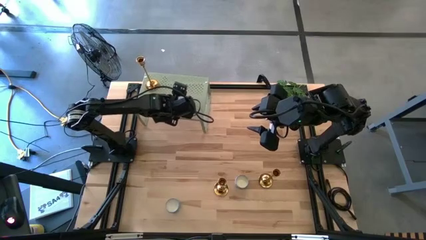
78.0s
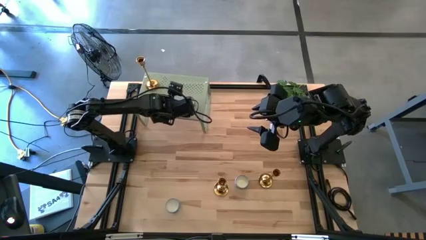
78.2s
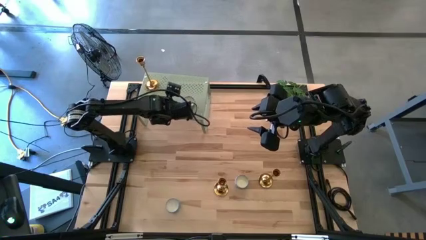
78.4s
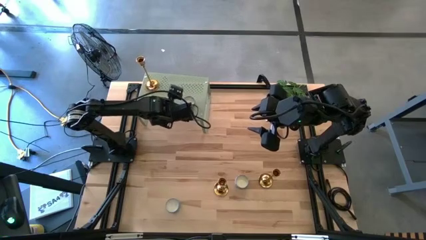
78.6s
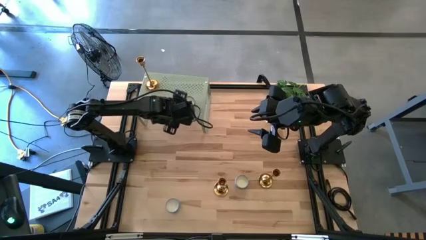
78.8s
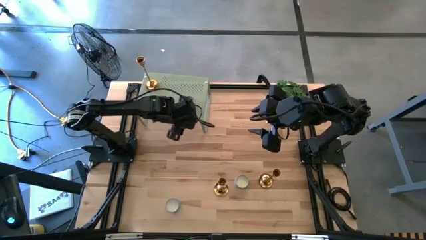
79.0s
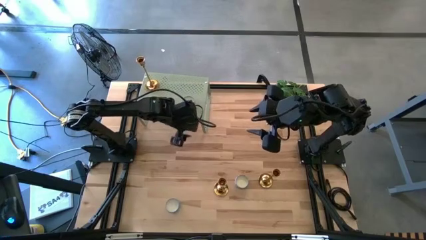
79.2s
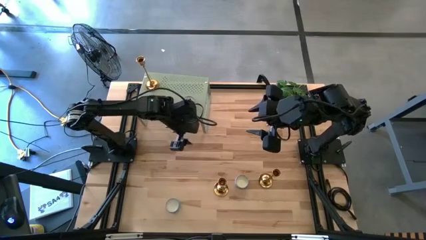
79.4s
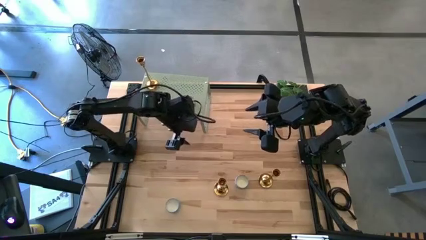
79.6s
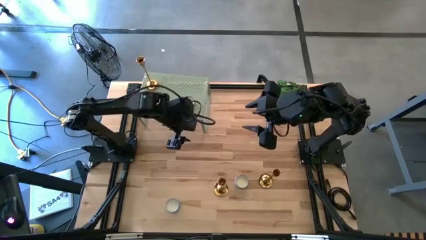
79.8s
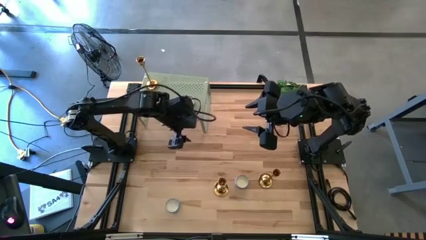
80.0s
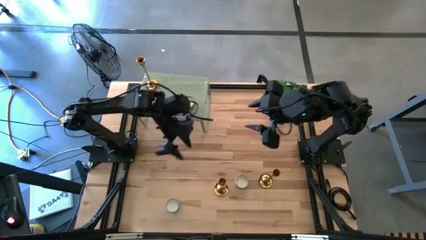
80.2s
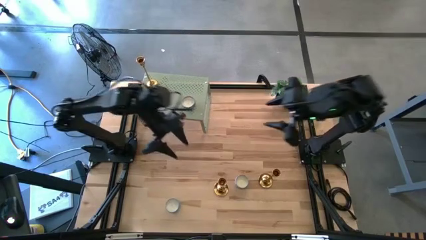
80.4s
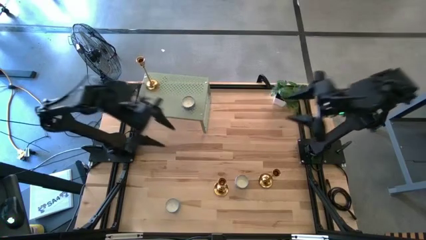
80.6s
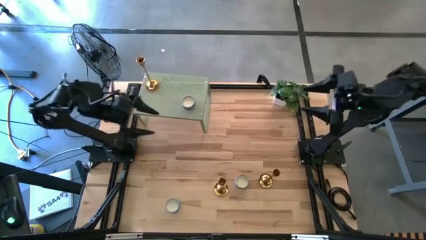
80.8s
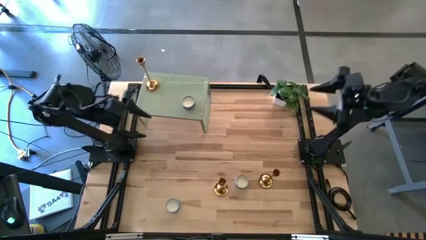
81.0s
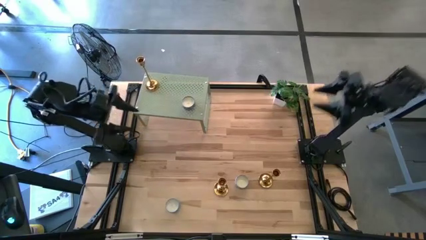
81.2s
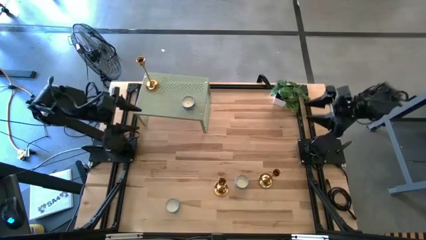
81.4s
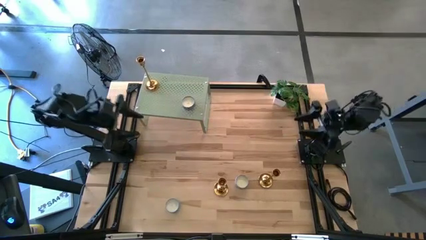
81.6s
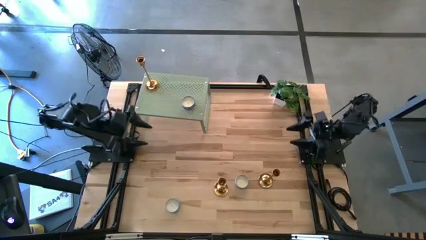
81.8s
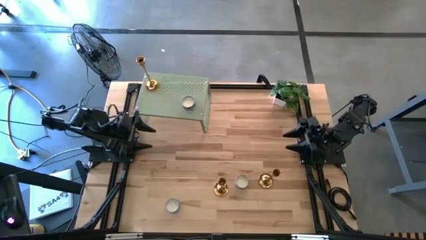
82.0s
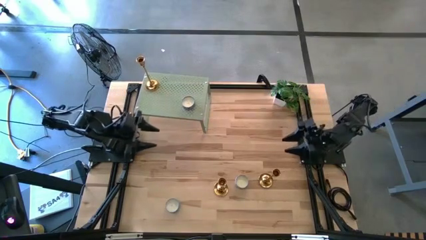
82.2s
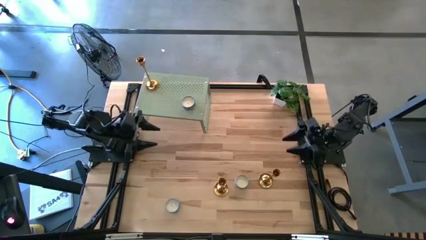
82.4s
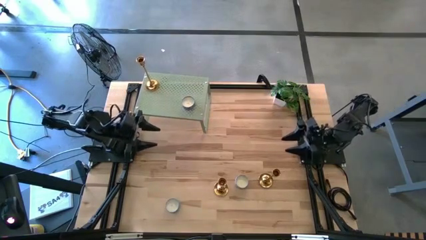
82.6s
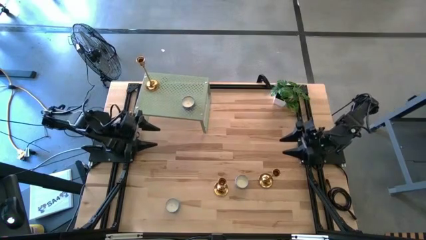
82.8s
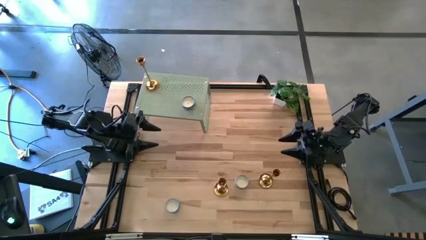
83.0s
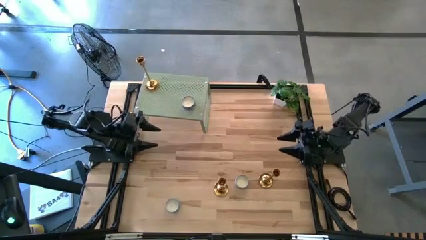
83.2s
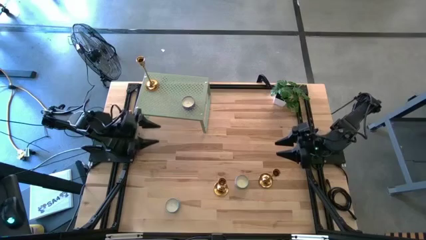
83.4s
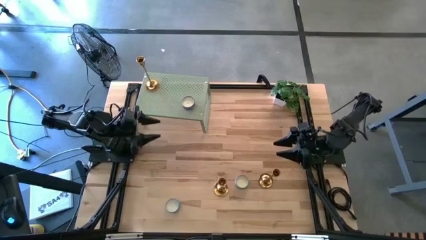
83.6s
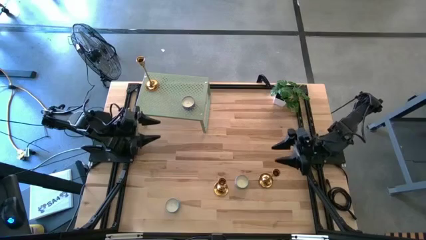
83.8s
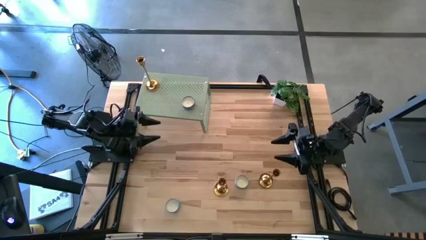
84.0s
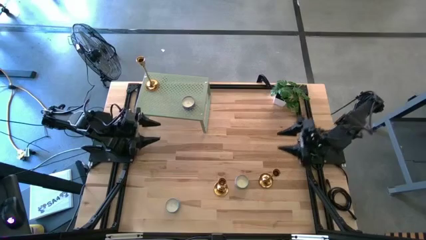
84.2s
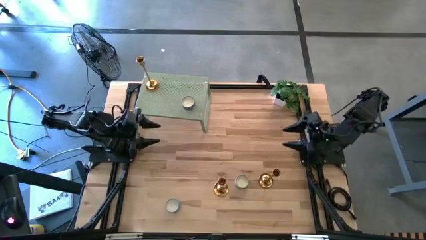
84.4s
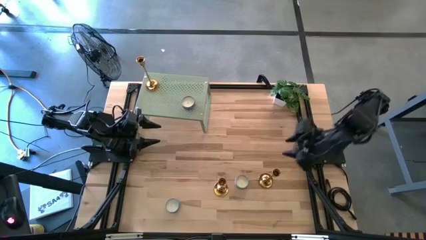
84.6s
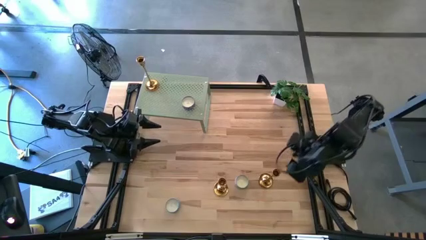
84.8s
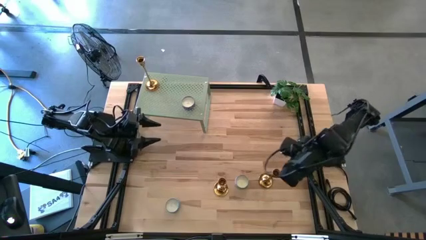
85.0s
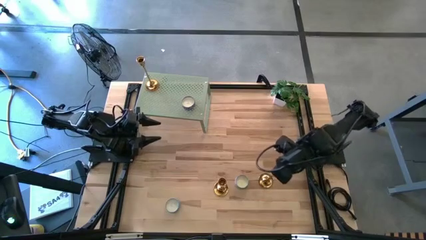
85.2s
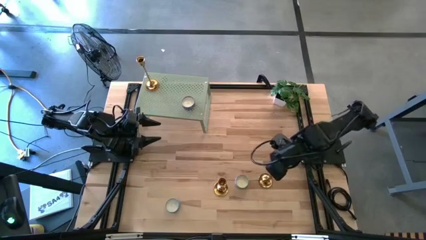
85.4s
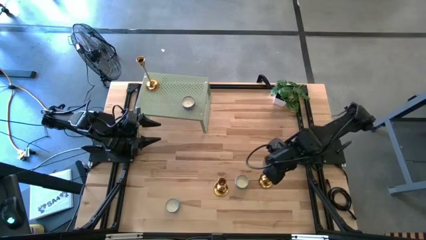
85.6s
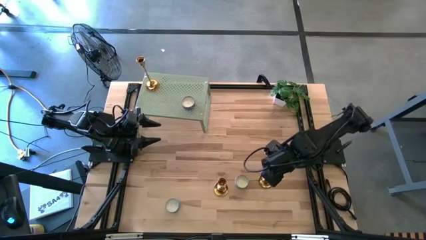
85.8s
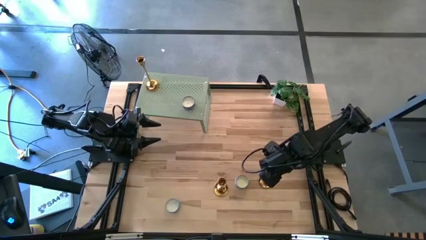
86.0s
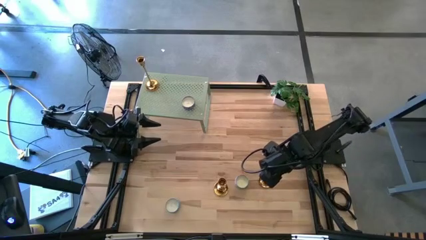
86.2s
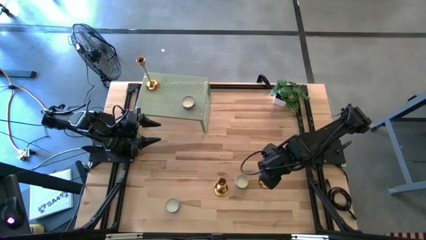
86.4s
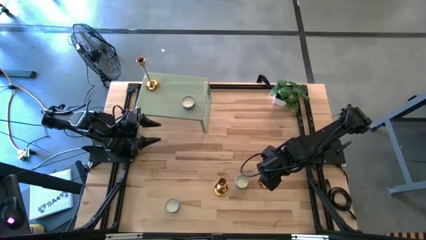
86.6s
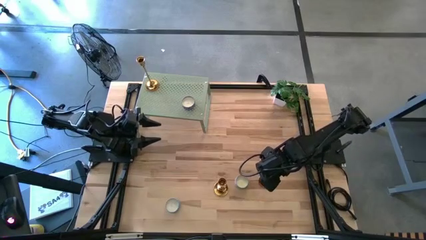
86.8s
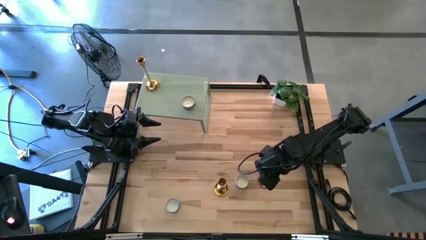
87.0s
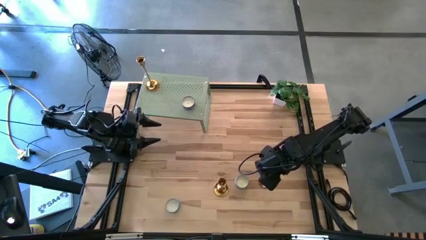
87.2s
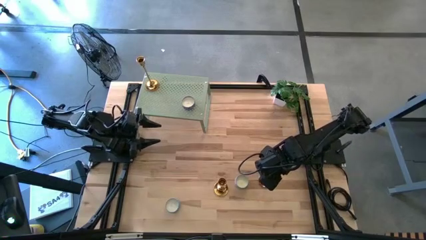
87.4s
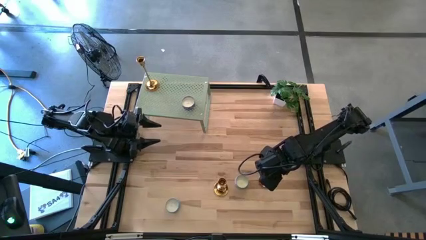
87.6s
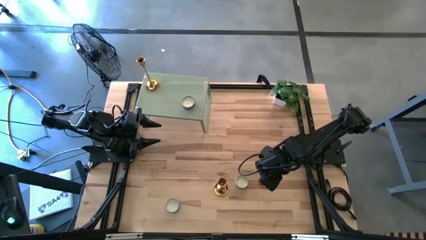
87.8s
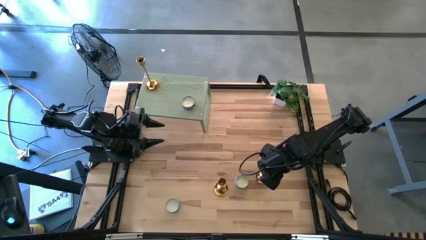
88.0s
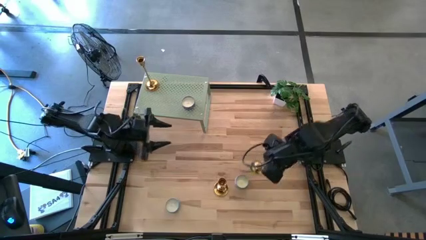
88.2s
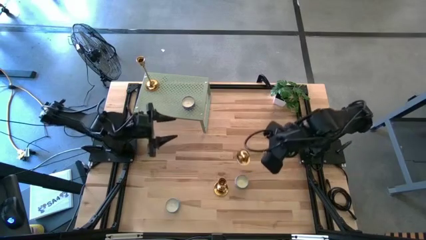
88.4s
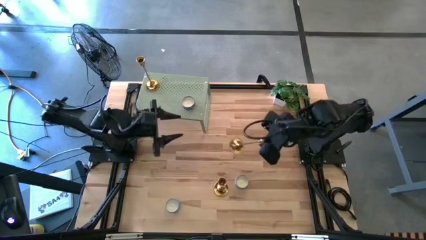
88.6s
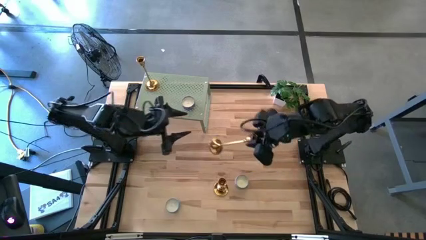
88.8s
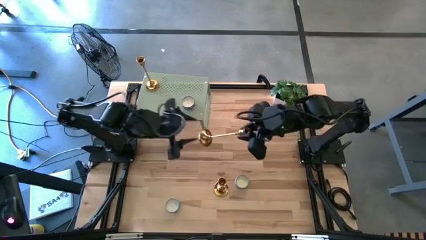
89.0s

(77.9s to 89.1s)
Task: Pick & Place candle stick holders
Put the right gold candle holder on the shelf

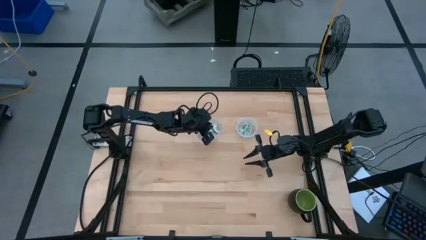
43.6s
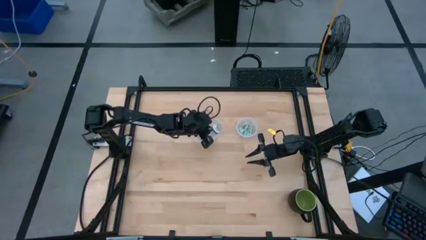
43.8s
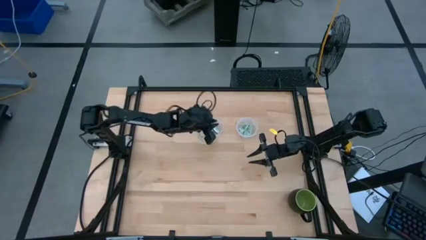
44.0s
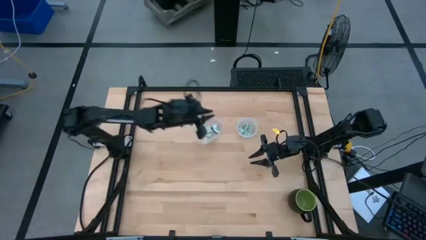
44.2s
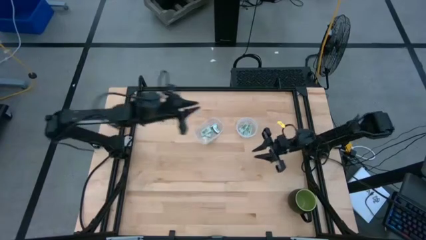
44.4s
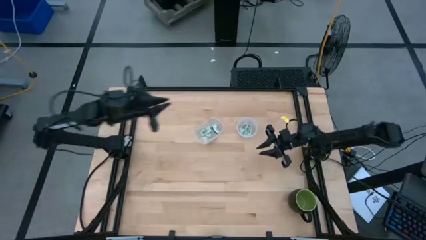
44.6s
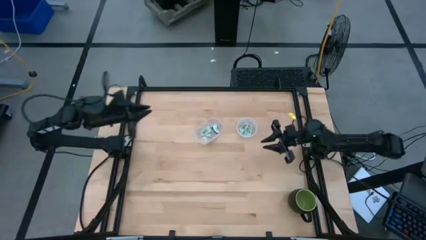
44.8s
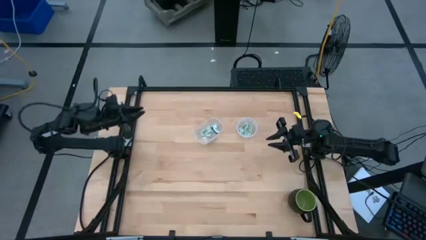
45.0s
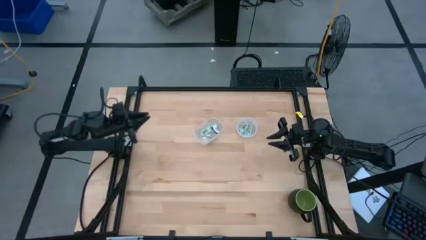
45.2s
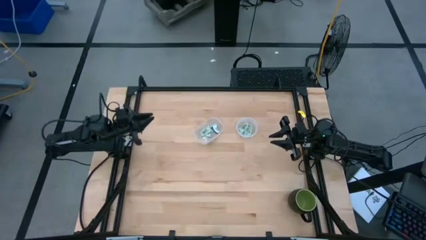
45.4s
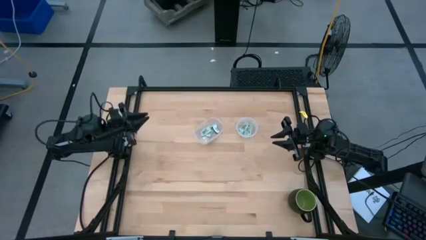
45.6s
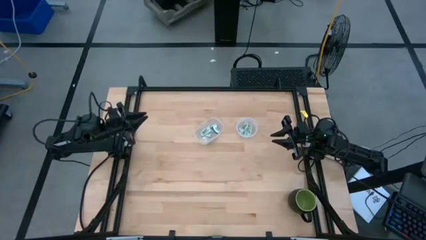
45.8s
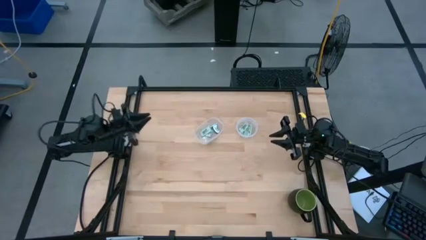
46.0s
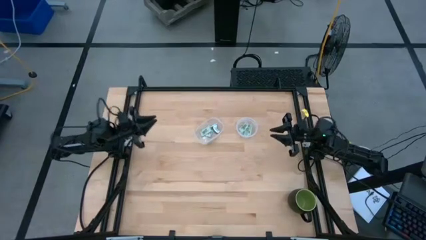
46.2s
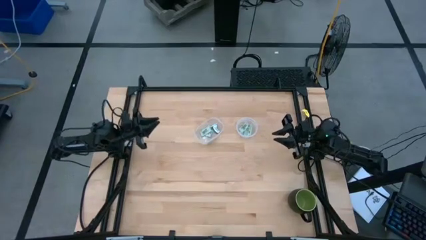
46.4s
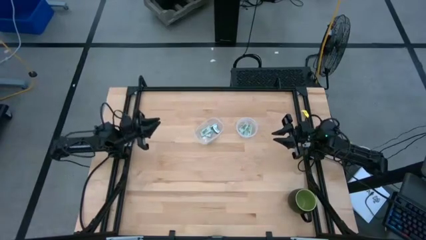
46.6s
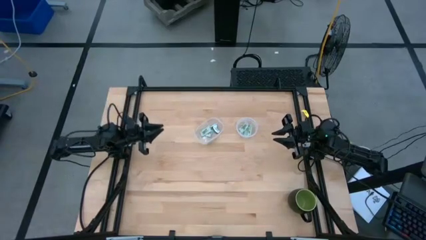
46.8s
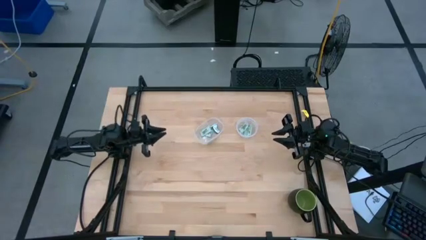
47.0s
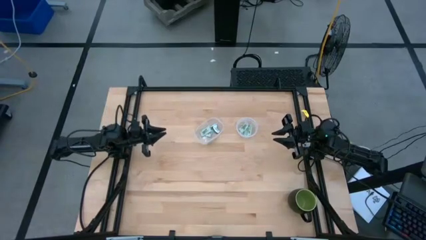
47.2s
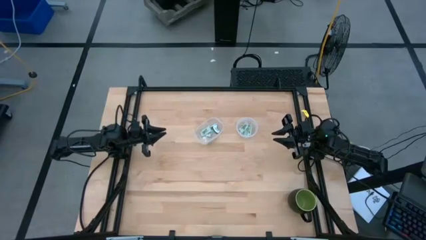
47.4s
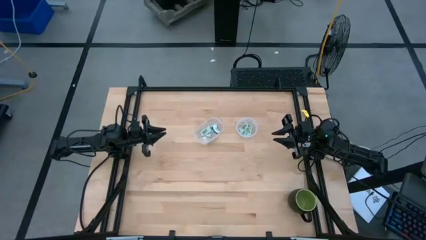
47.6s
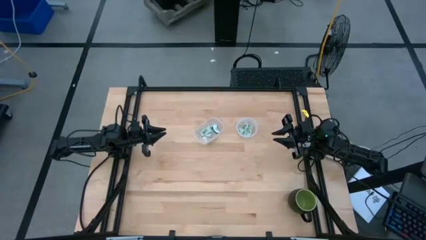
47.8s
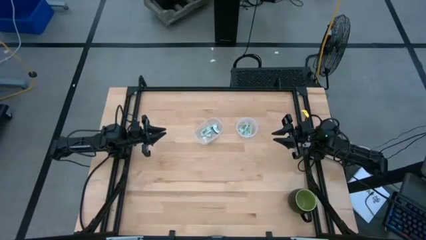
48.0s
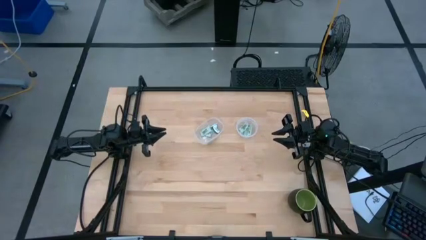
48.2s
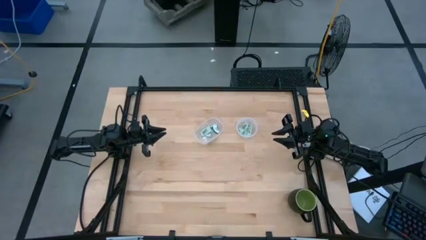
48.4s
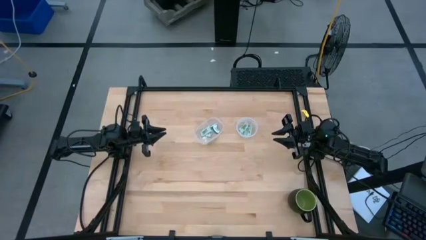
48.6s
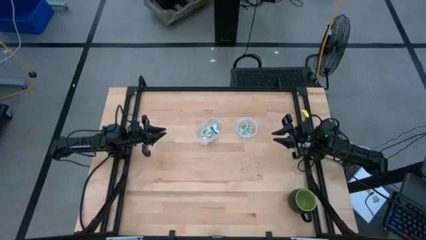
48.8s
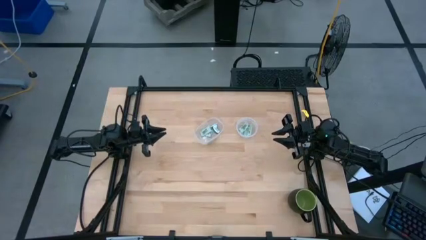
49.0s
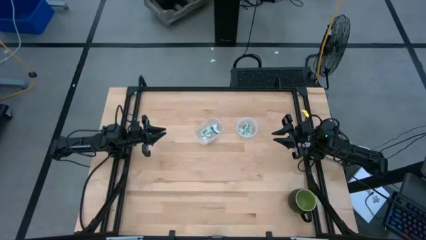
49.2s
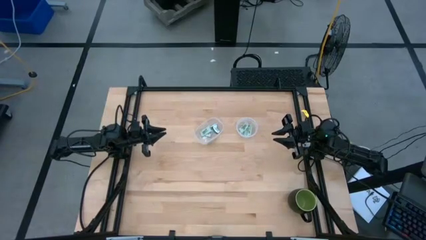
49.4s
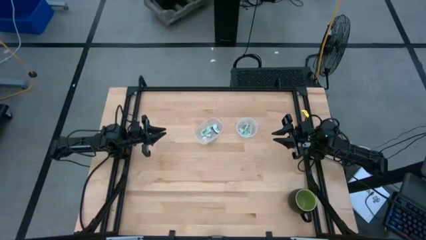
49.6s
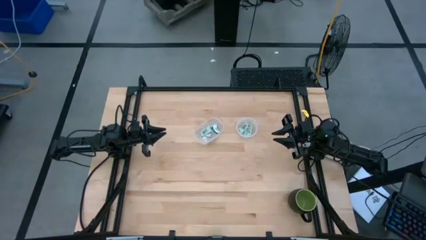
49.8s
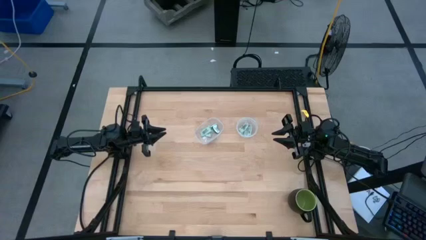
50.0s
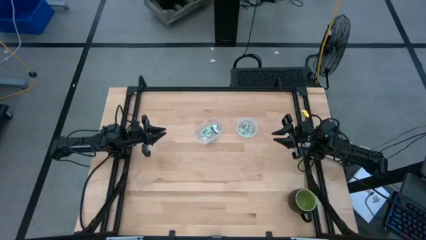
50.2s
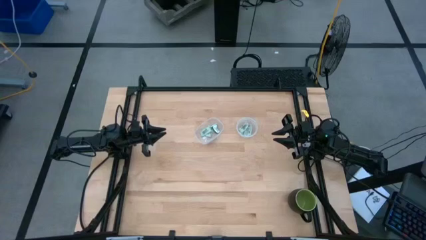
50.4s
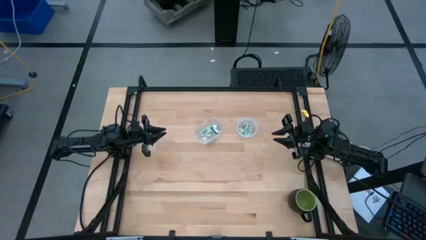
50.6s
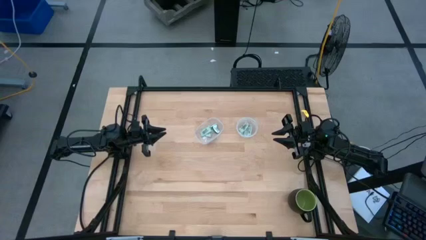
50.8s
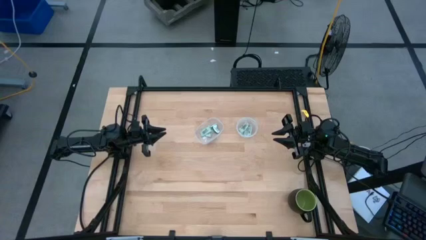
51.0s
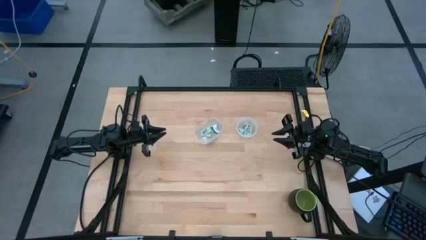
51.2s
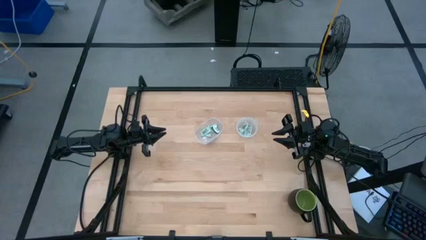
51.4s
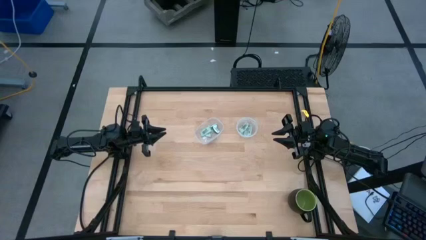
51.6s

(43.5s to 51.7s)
Task: Pick and place Stevia / Truvia into bins
Return to Home Position
